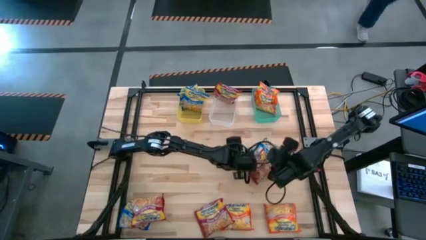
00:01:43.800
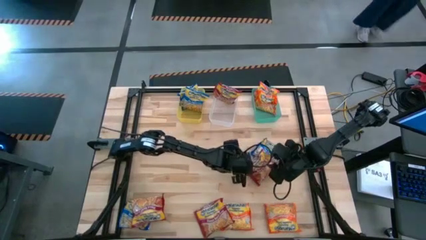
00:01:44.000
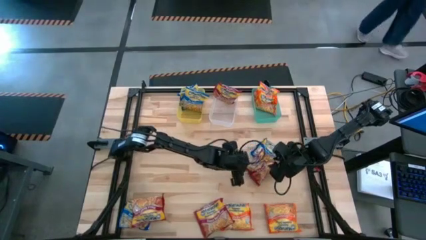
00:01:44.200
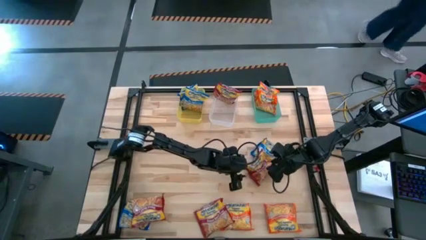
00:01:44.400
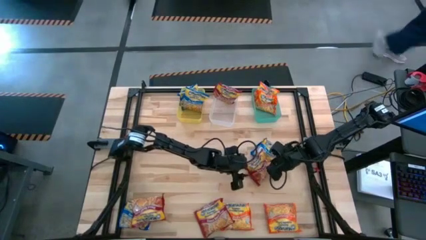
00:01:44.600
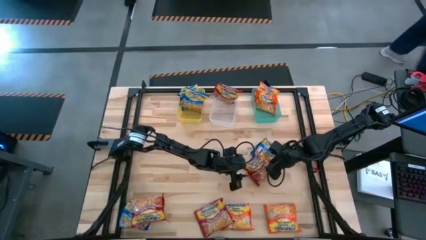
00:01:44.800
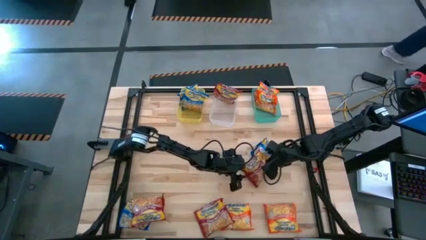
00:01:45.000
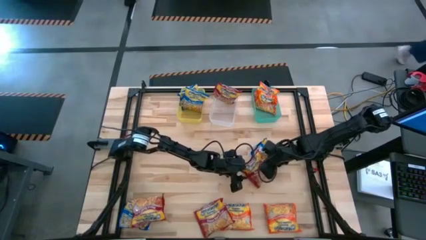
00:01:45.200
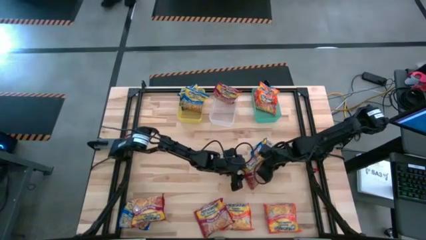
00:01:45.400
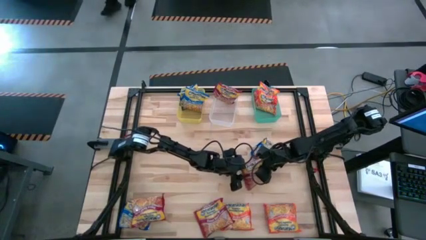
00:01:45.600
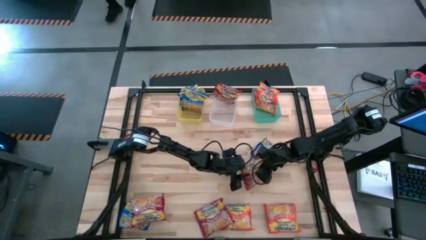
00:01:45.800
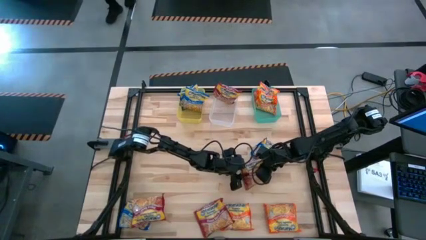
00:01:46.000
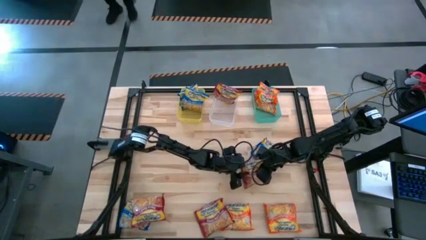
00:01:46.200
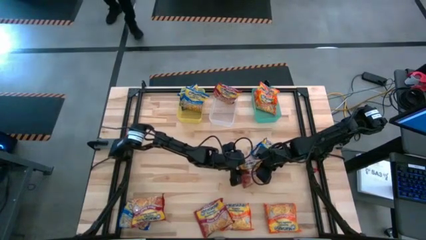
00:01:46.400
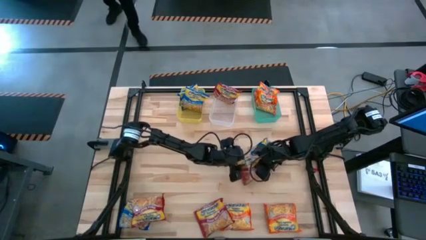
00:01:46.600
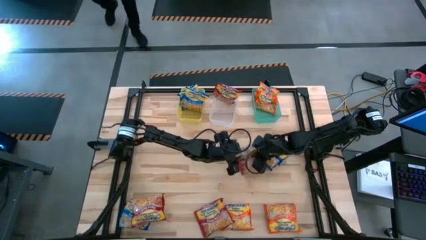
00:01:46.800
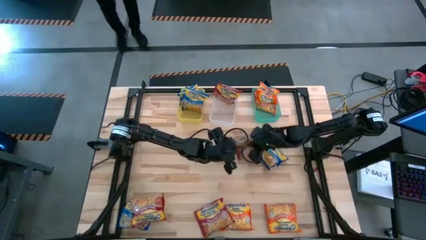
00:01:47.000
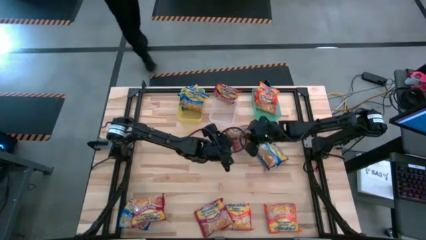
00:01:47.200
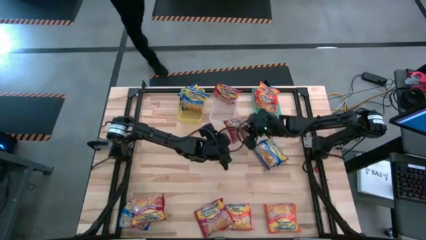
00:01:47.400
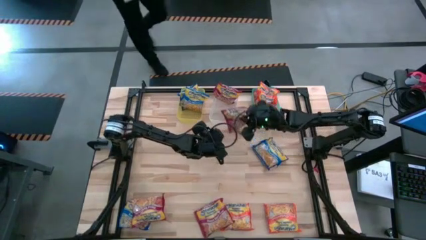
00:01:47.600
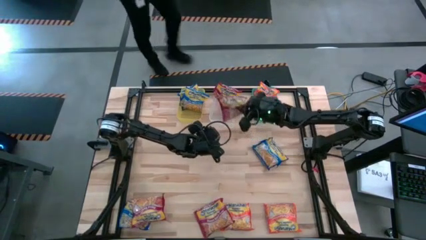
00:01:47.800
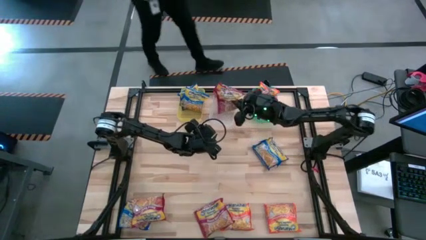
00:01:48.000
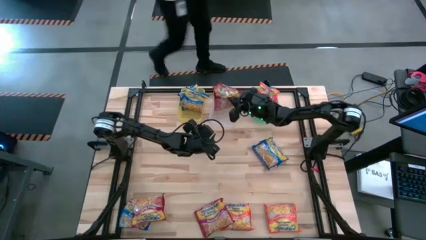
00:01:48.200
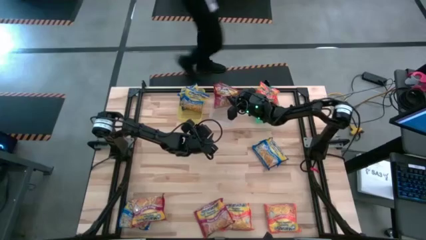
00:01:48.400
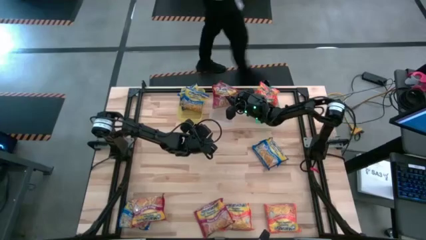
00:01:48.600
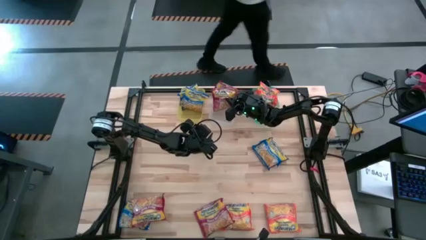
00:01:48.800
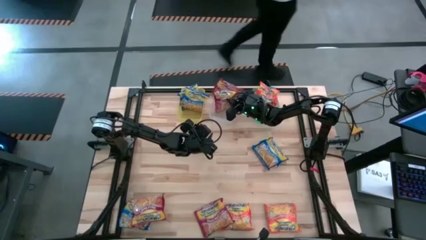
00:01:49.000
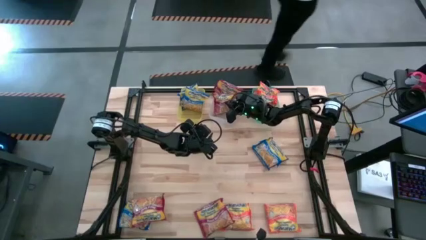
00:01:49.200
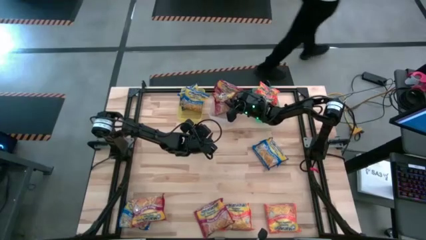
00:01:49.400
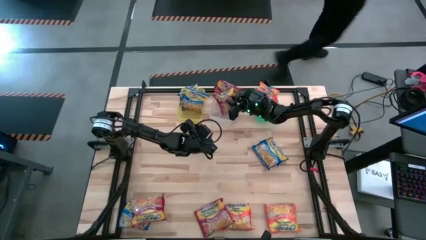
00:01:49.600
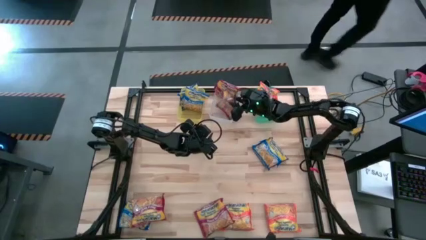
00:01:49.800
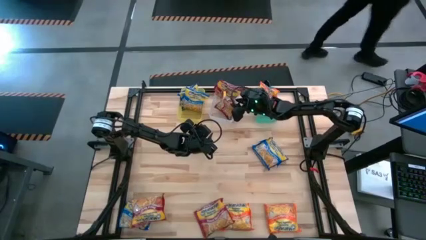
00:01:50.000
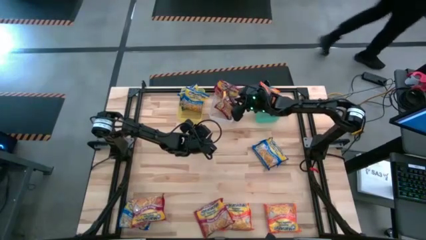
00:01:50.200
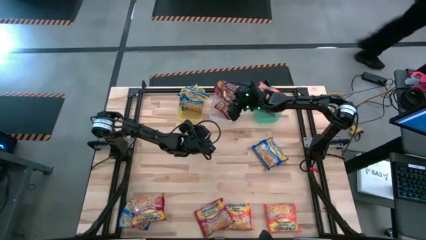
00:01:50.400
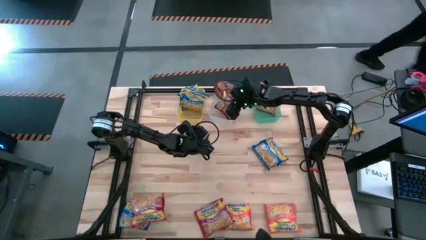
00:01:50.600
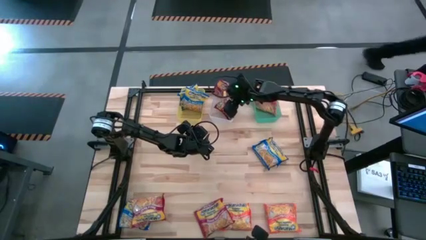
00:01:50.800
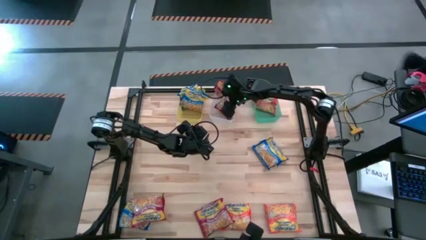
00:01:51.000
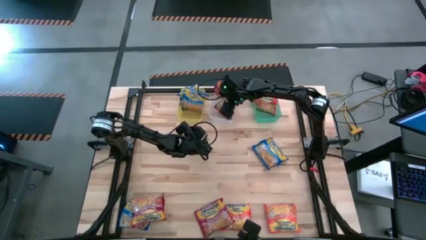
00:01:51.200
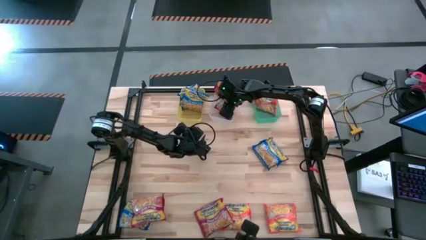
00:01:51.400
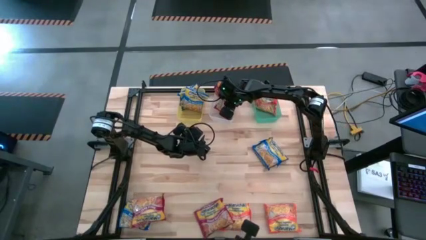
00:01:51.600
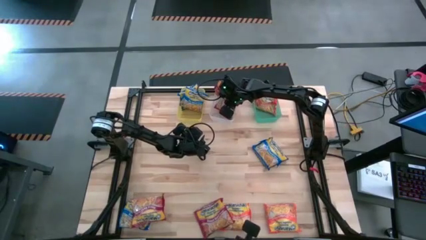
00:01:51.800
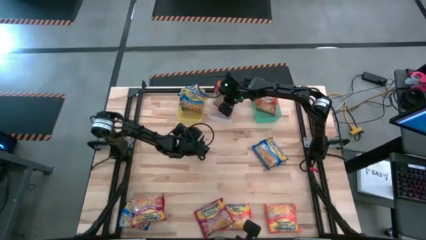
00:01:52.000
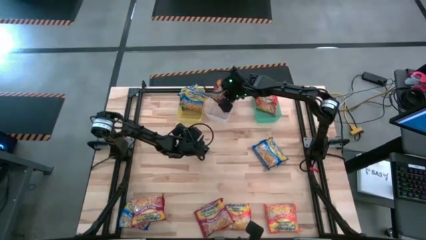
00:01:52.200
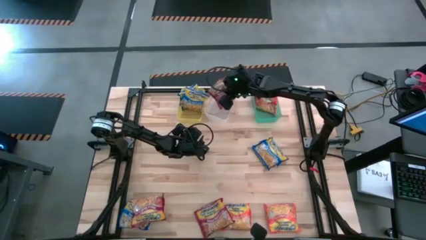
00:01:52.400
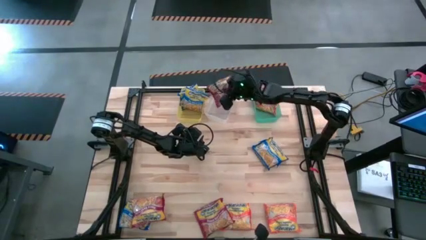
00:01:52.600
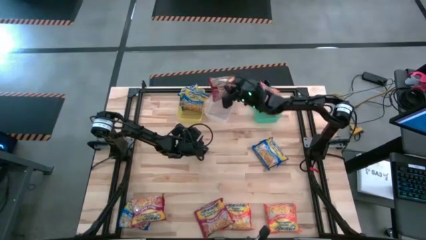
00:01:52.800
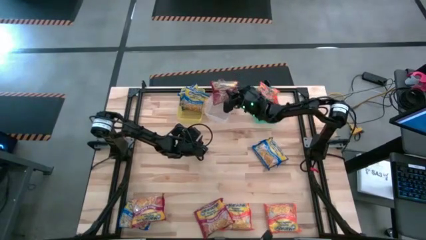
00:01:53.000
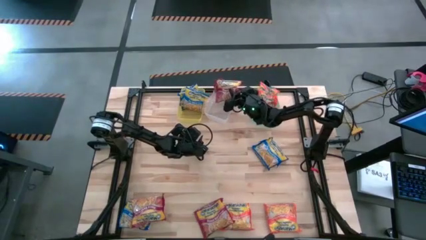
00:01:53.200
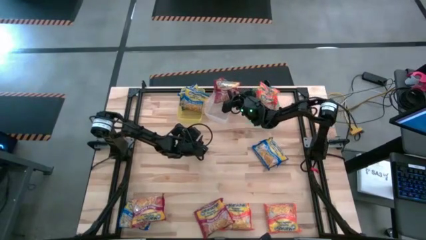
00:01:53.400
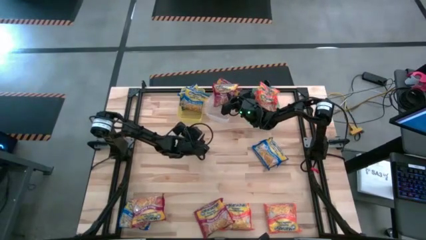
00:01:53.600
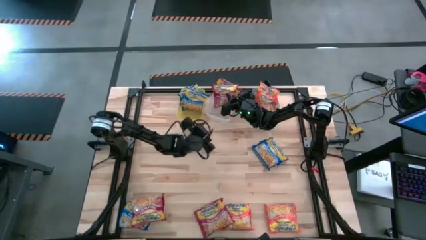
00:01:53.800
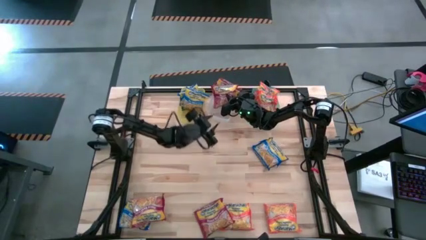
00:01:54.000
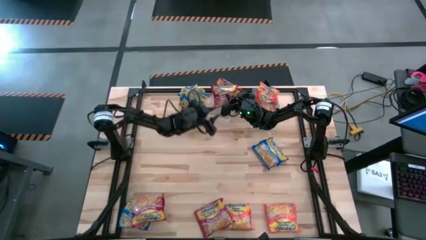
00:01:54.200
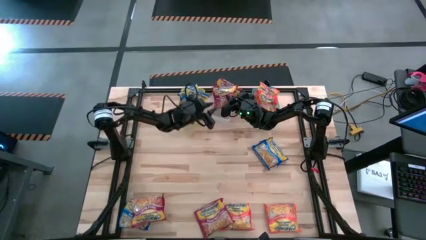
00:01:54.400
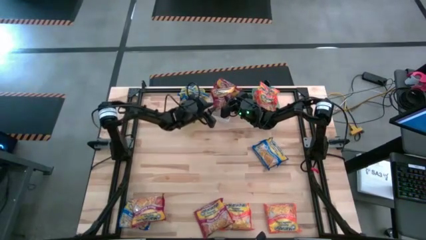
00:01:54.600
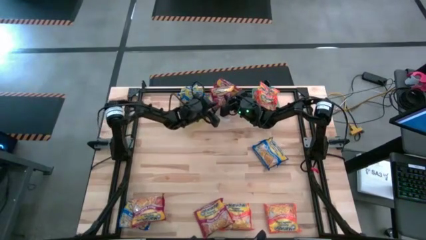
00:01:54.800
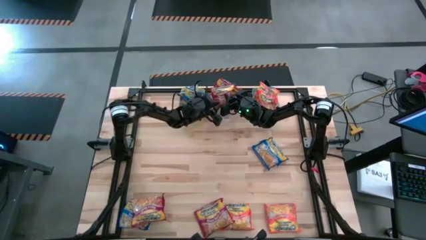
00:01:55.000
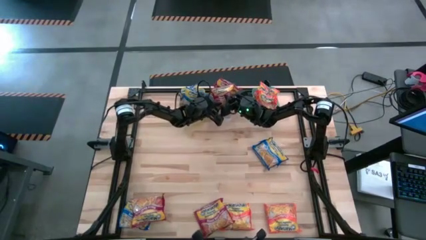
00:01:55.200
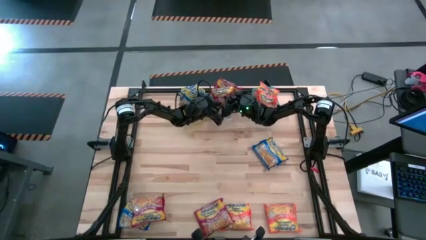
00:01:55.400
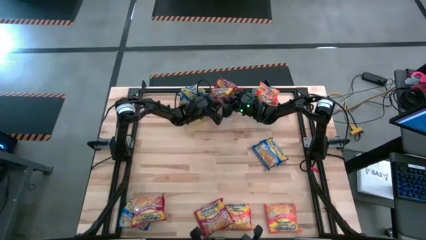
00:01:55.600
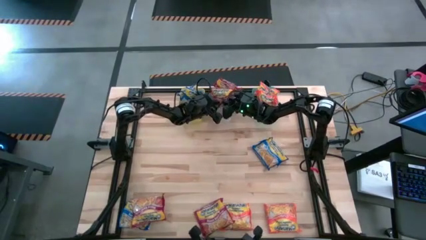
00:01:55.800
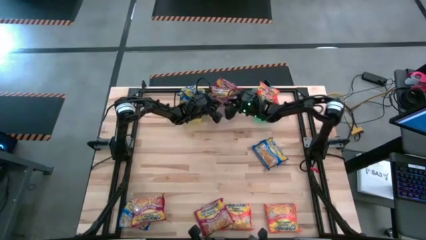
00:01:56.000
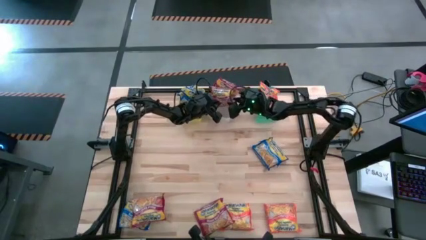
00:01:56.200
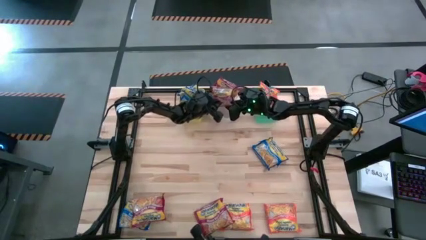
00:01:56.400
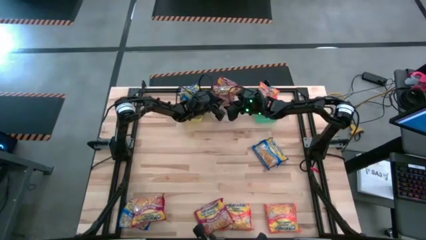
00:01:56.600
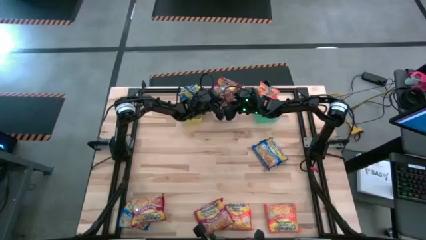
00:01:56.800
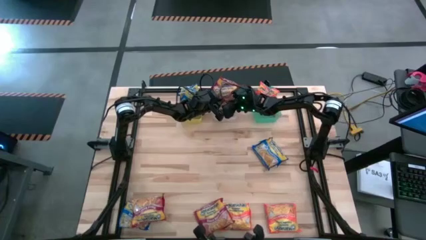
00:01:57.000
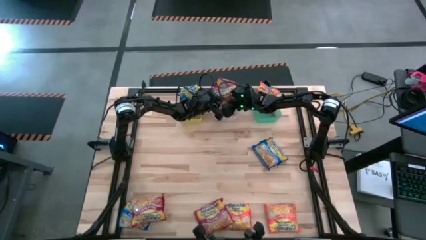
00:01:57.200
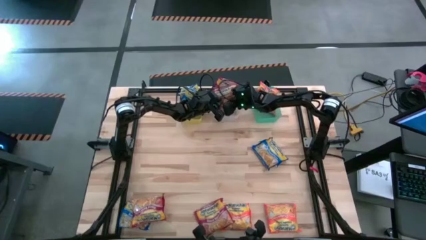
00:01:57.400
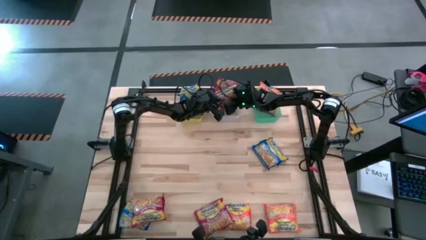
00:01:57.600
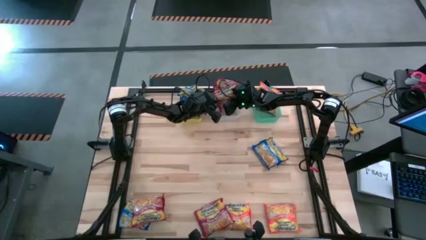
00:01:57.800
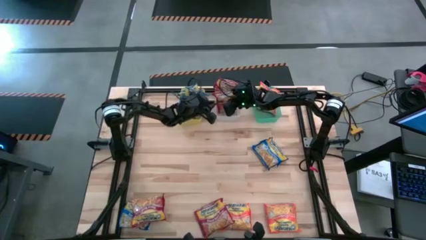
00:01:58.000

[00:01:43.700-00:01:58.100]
Task: Sort Maruchan noodles
Put the right red noodle pack into the white bin

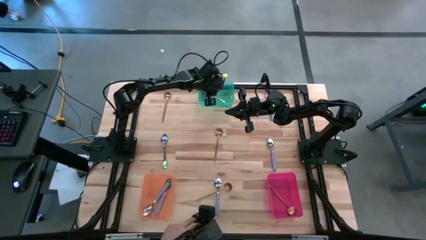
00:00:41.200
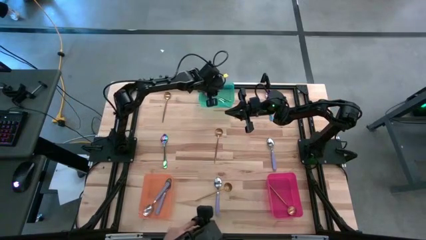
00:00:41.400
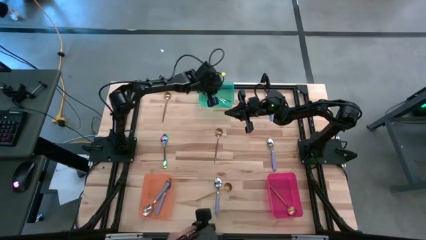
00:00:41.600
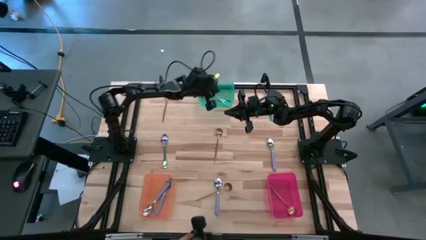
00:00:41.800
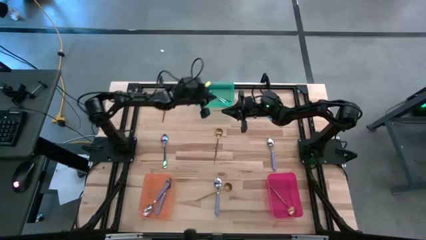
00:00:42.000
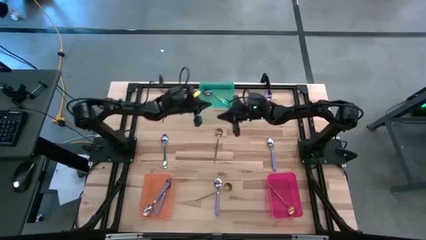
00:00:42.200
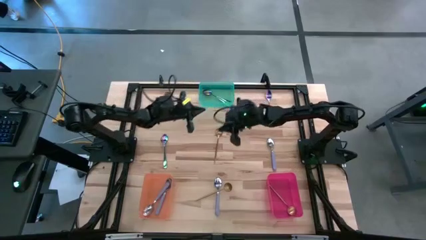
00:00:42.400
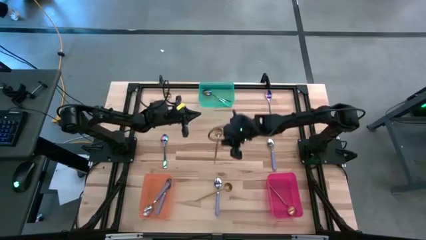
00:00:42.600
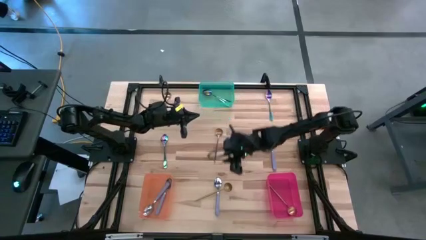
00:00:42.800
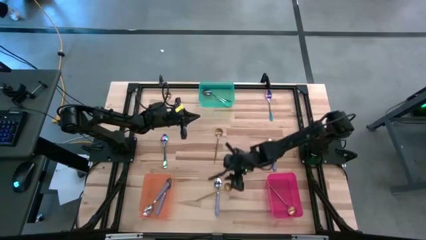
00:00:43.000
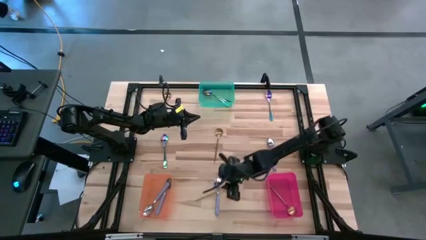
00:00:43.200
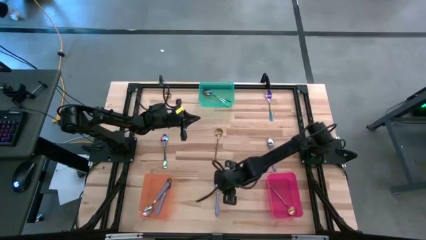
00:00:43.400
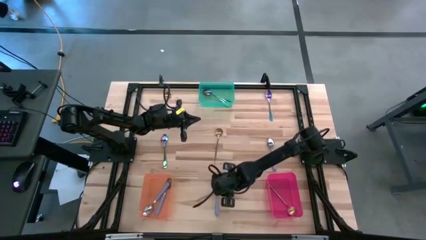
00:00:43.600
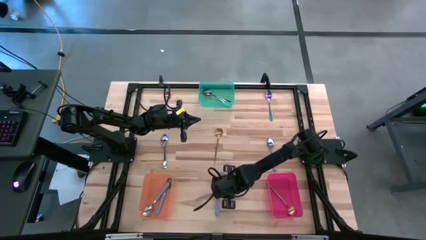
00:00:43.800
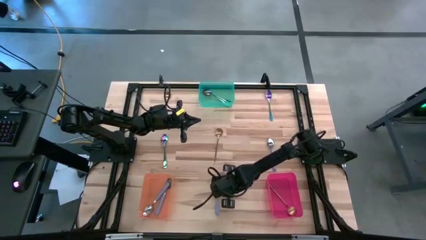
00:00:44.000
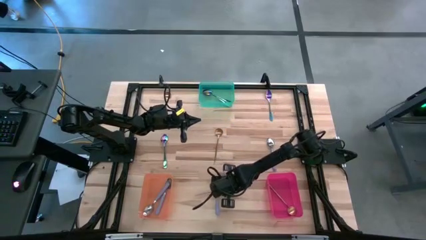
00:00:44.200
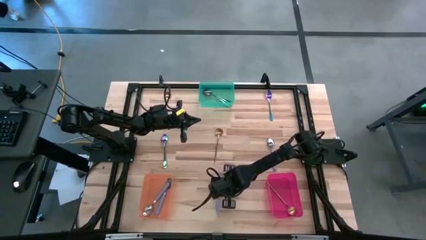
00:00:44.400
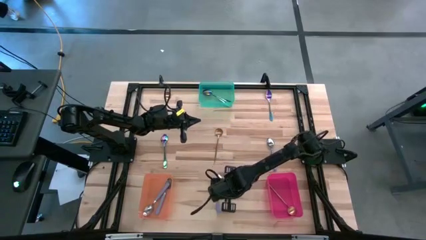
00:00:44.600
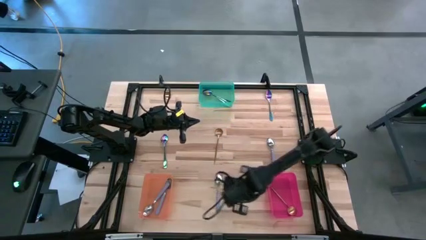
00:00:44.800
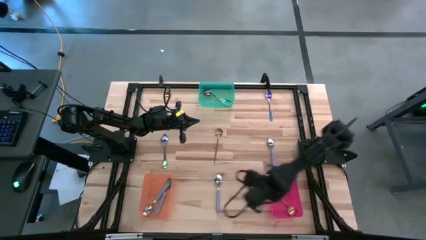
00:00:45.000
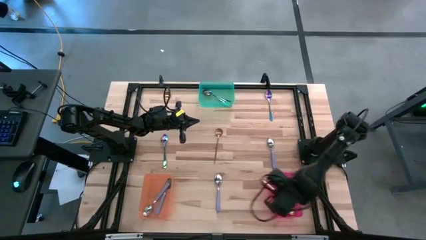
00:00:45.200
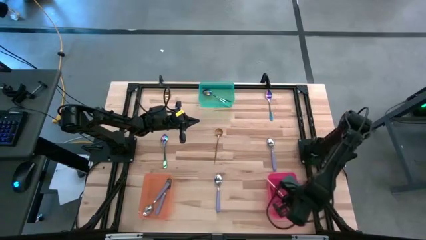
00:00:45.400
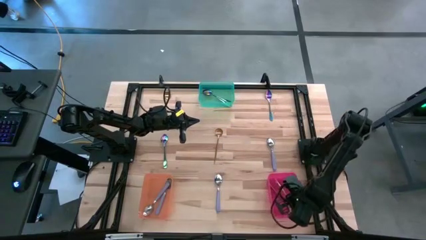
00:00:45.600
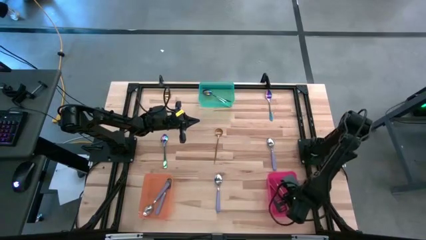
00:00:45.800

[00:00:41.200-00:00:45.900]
Task: Sort silverware by color (type)
Put the gold spoon into the pink bin
